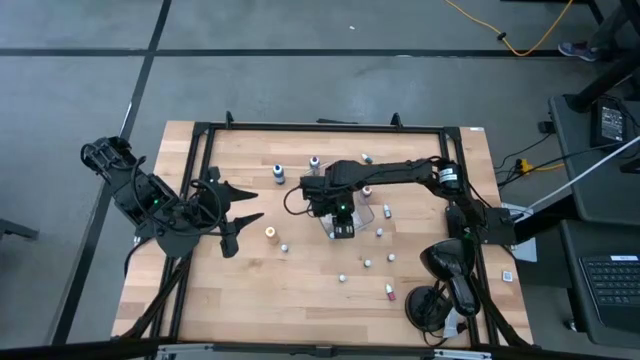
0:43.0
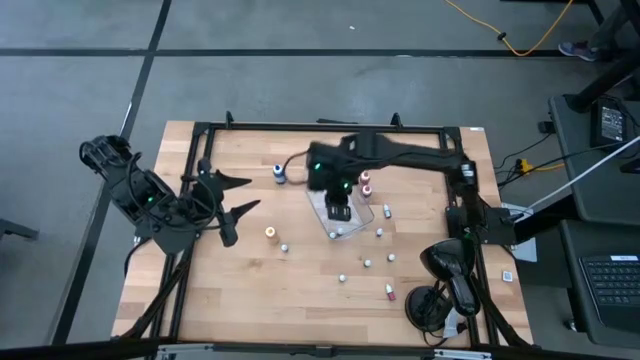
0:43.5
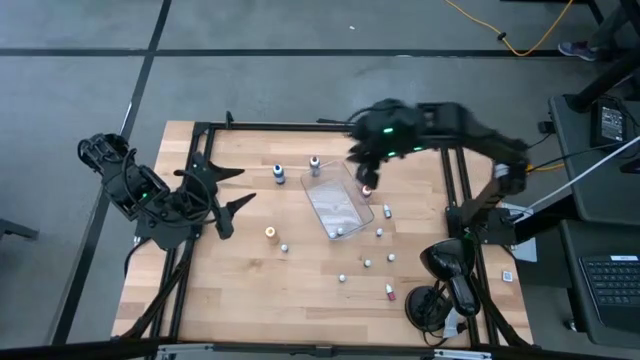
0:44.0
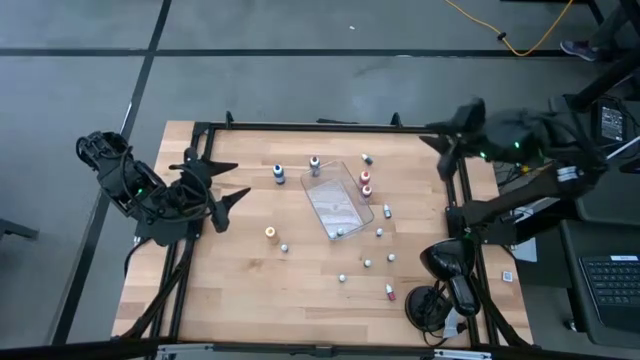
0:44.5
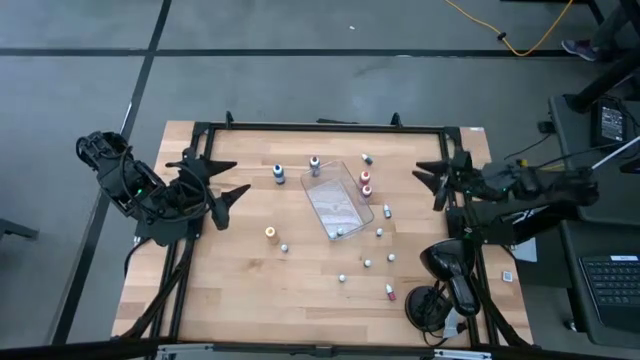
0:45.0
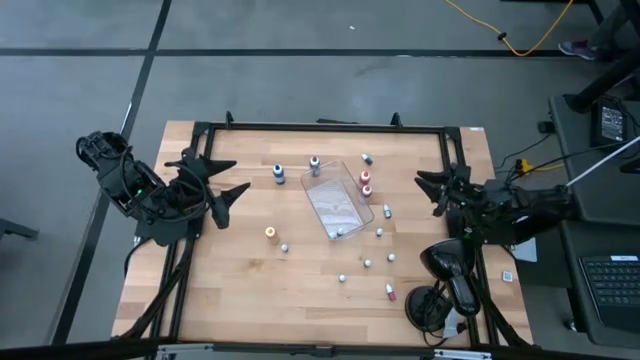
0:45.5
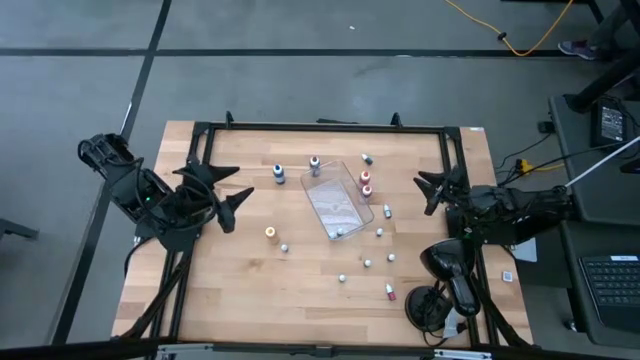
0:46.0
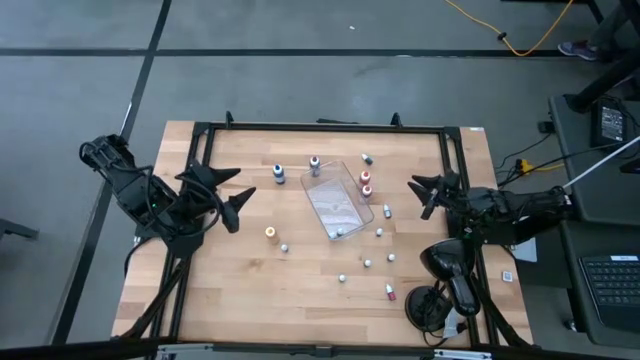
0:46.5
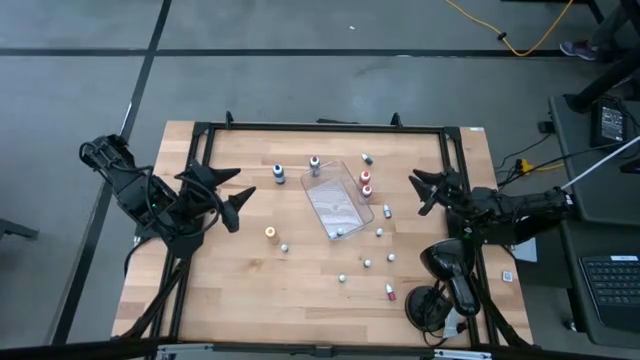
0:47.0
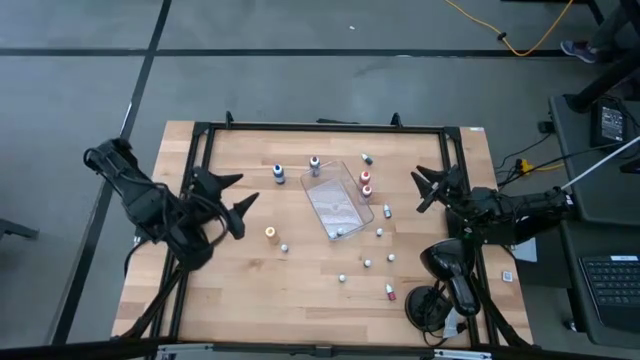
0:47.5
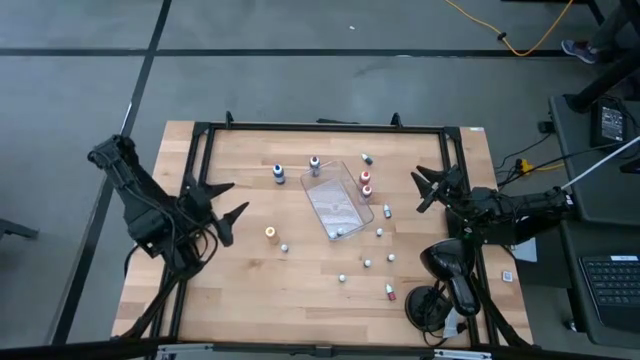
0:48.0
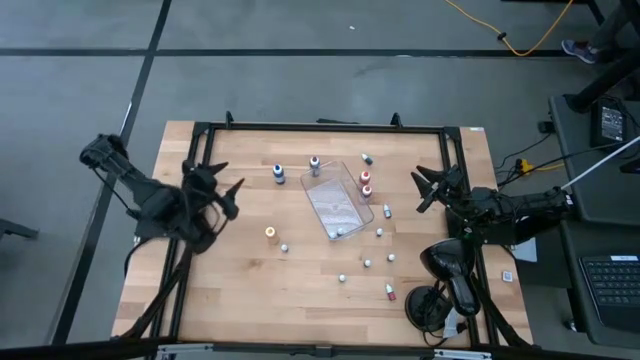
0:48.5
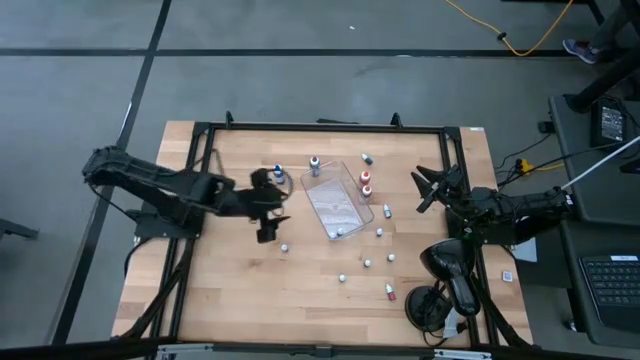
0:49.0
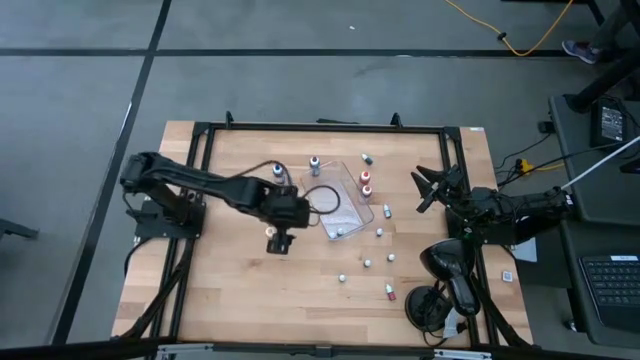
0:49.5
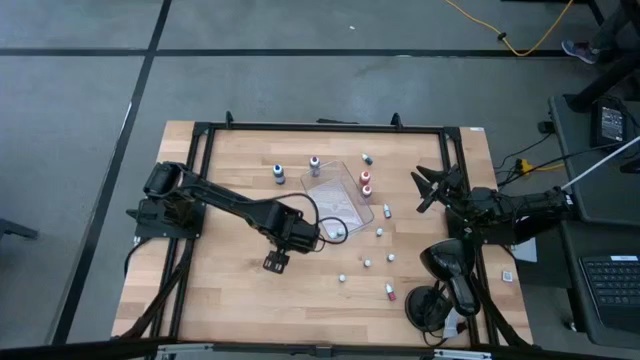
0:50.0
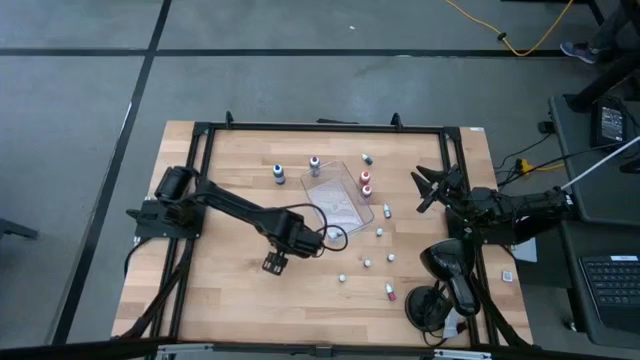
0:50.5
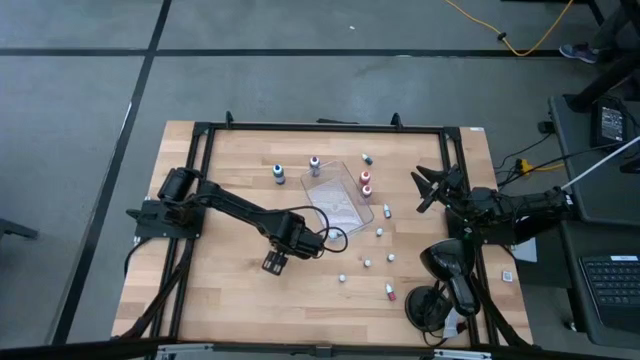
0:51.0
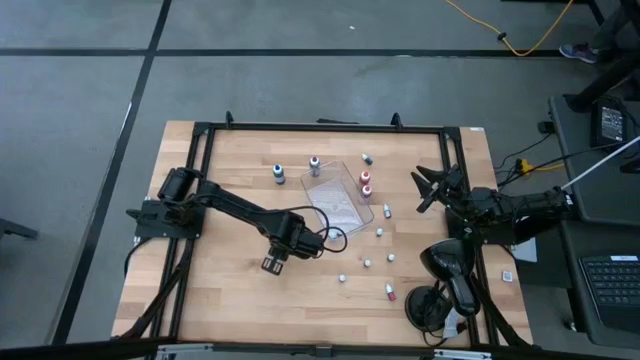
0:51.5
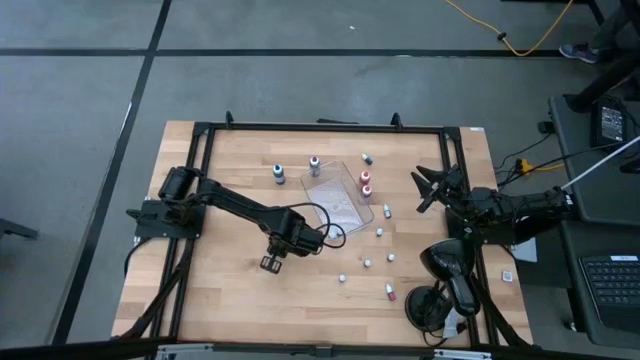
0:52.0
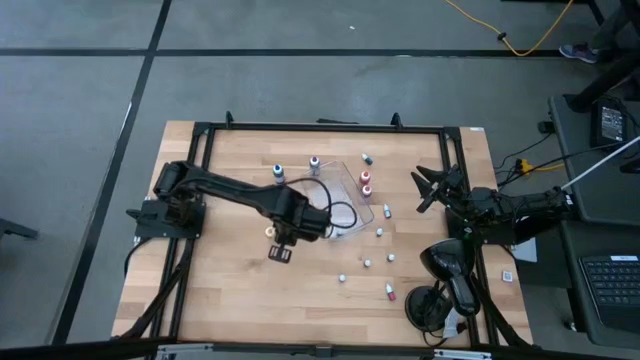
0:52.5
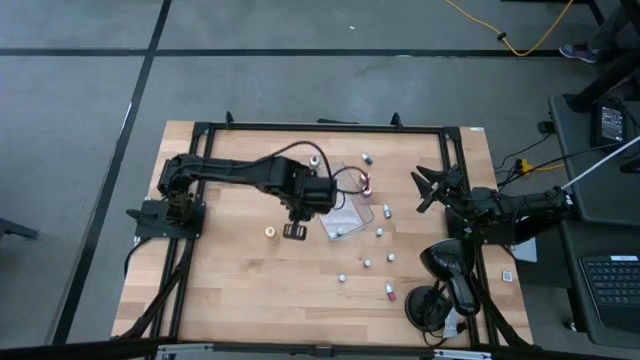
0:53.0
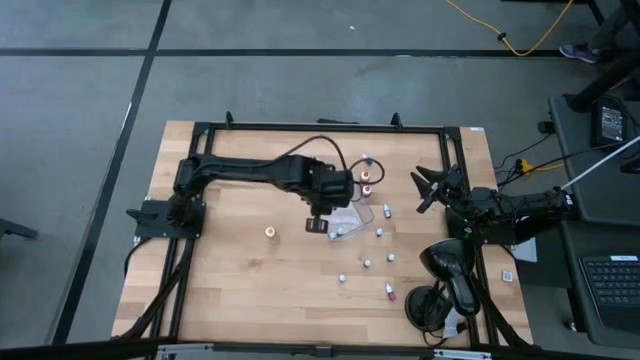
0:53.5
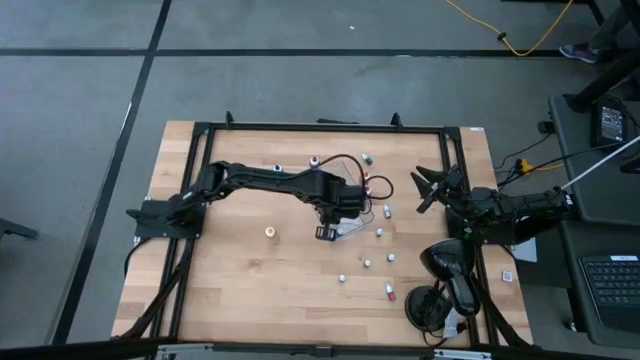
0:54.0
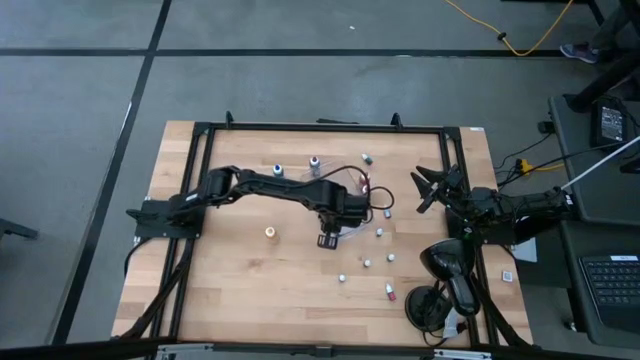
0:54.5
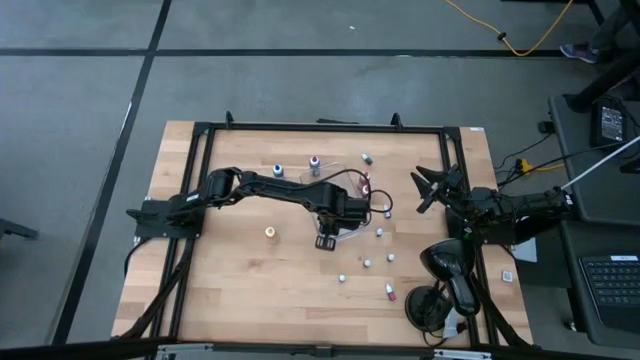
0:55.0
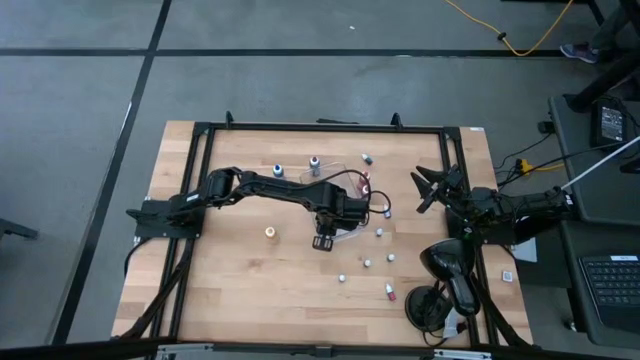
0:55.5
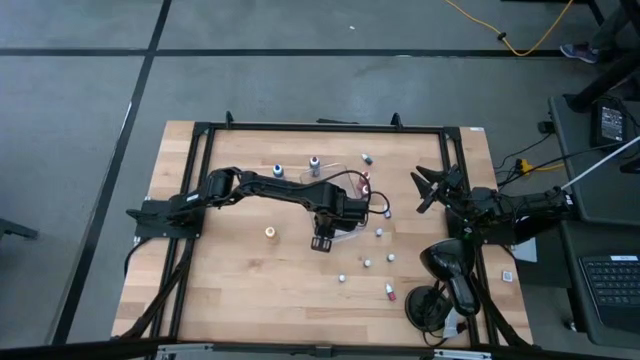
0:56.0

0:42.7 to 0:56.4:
Task: Pick & Place food coloring
Put the small green food coloring bottle into the bottom of the bin

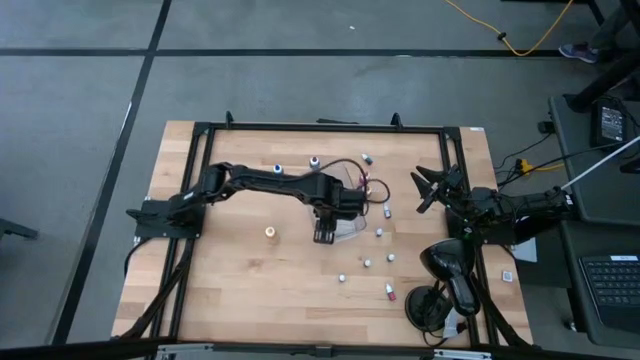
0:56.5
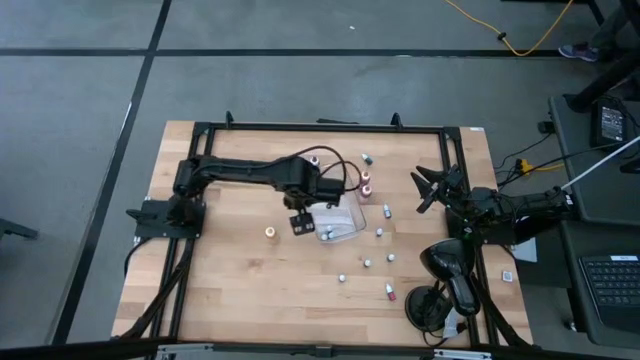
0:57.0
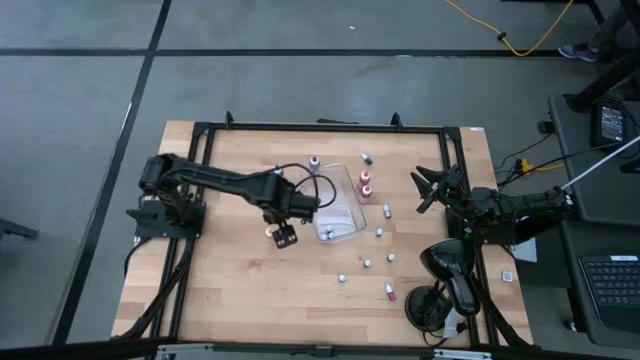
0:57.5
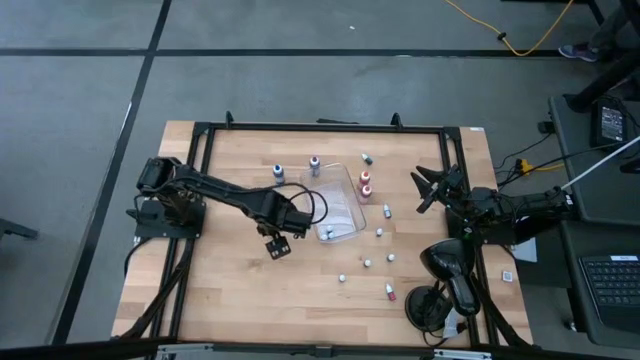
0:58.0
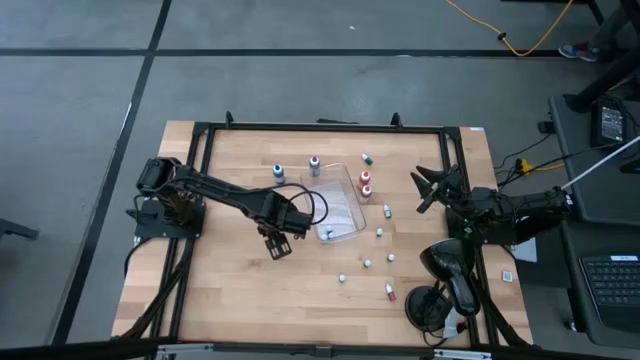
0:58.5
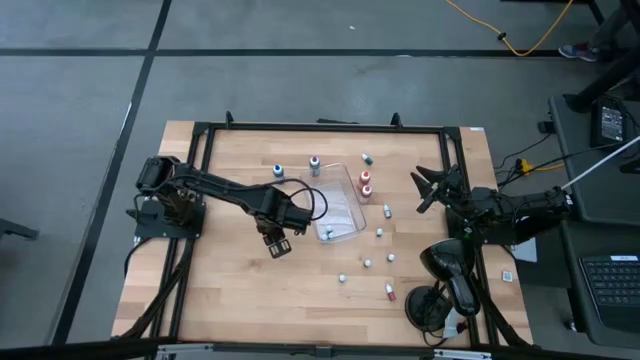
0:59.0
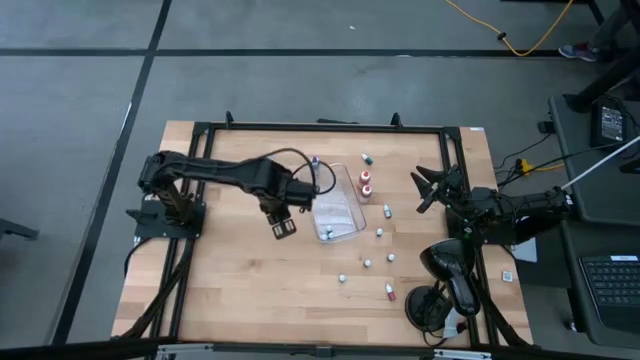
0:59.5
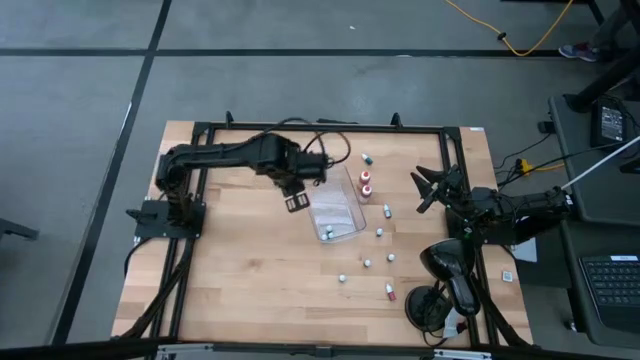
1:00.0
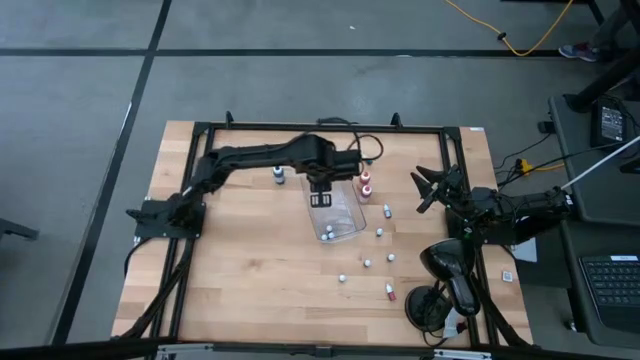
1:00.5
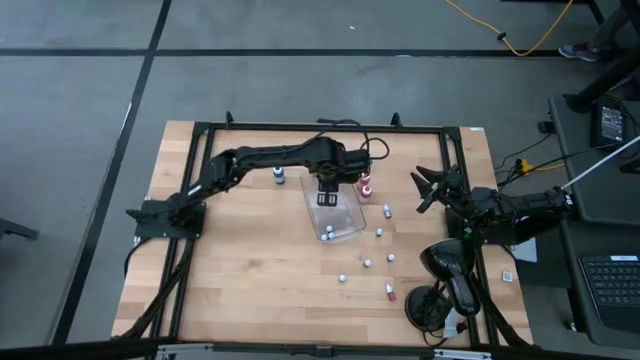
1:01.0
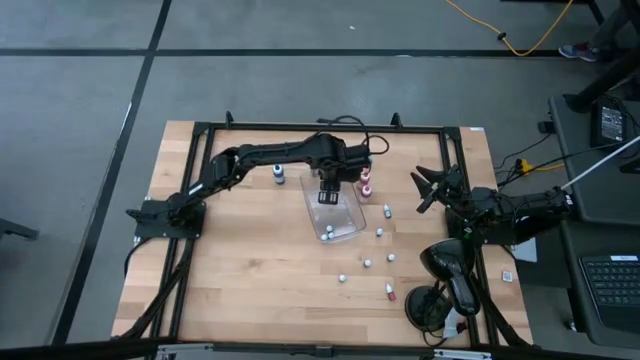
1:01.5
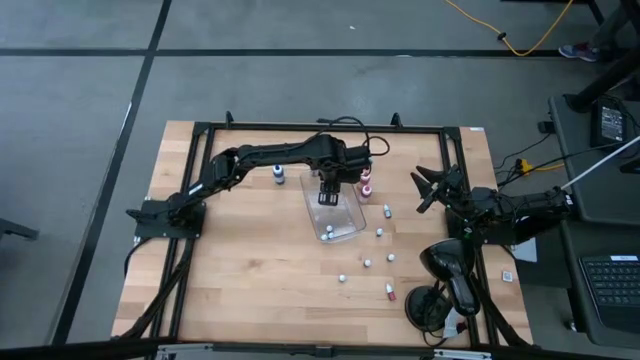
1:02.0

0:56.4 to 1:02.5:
Put the large yellow food coloring bottle into the top of the bin

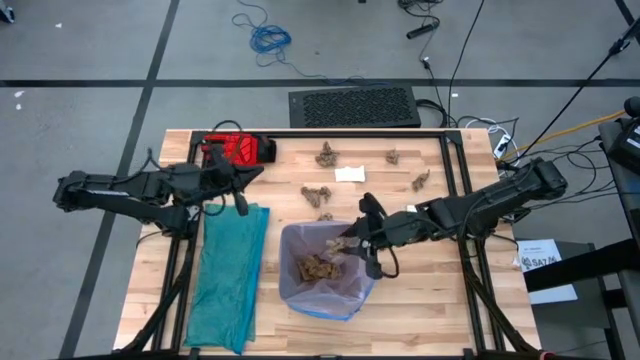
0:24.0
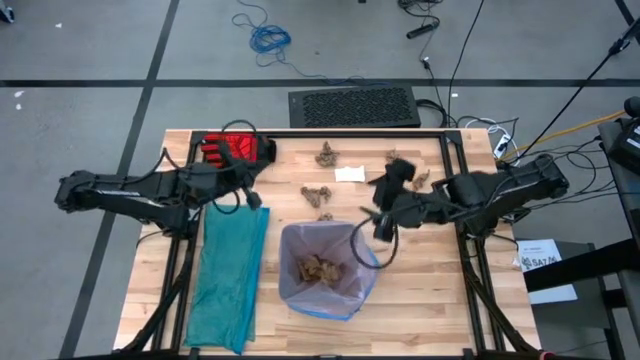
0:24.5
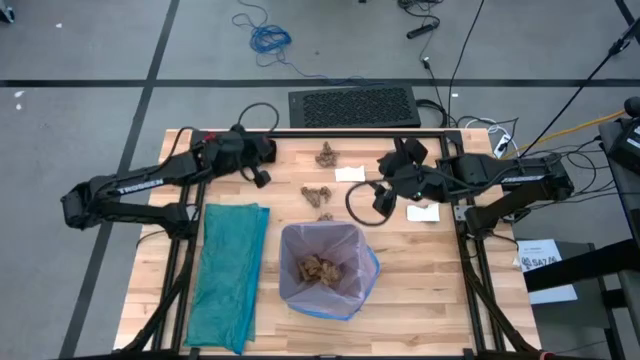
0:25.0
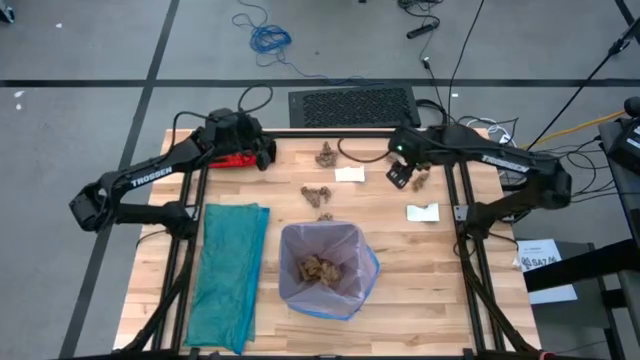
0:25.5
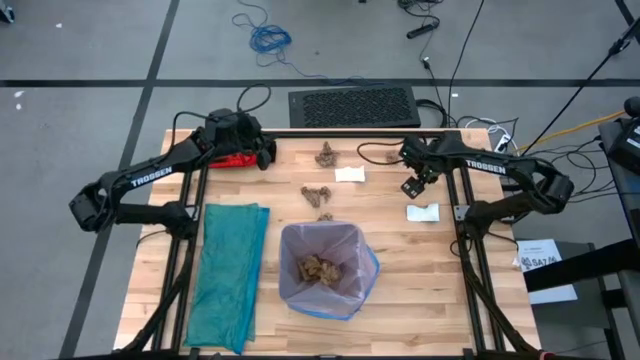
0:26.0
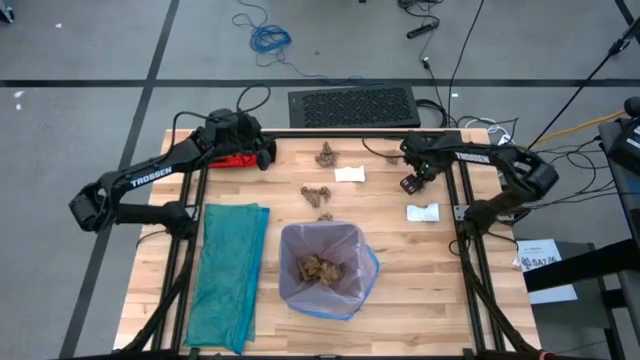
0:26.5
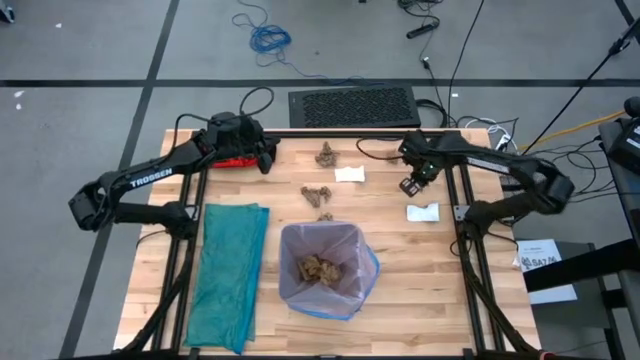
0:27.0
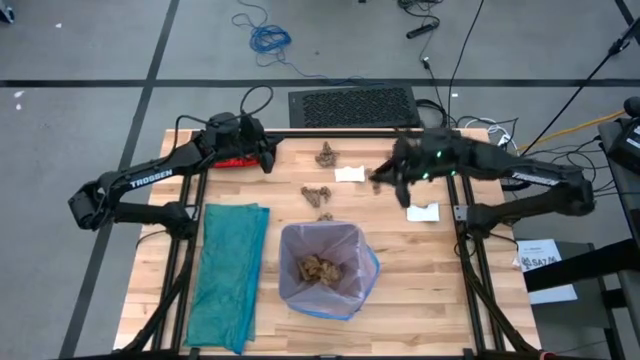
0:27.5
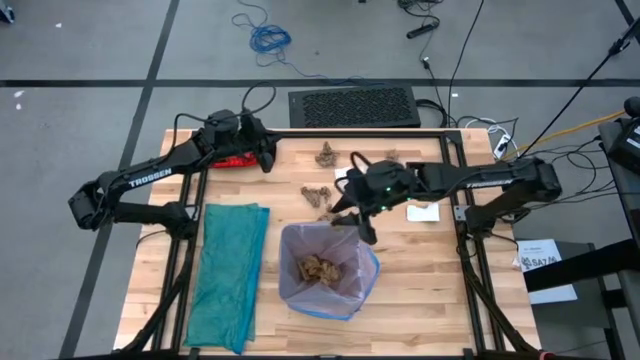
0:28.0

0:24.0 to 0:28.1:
Task: place trash/remove bag and relplace
Put the brown napkin into the black trash bin
